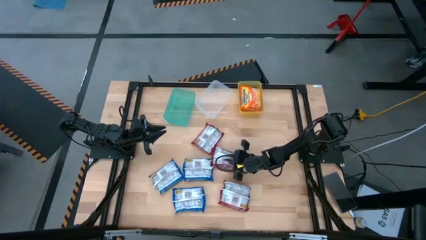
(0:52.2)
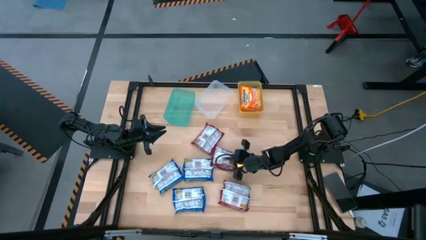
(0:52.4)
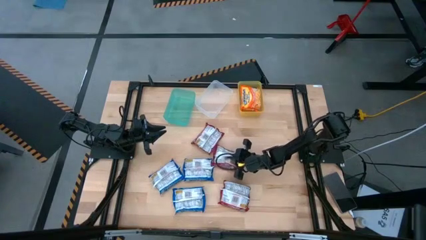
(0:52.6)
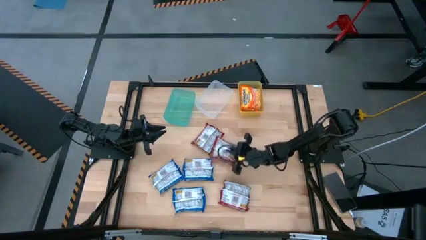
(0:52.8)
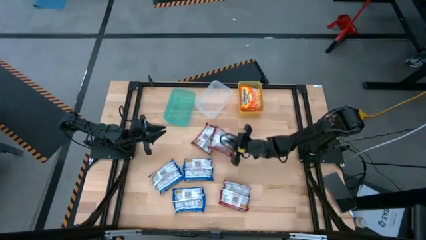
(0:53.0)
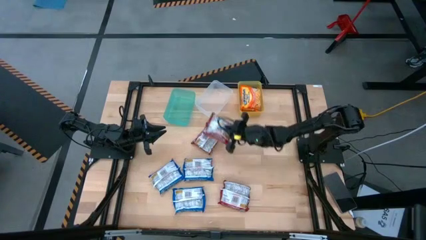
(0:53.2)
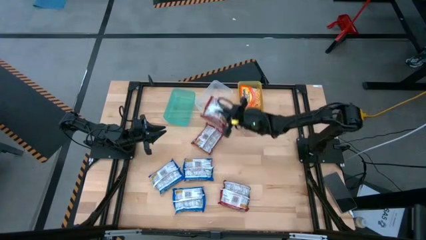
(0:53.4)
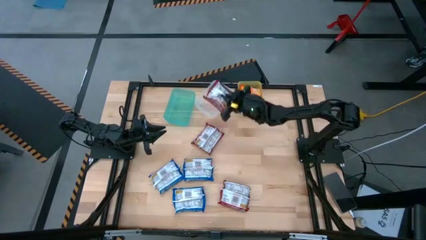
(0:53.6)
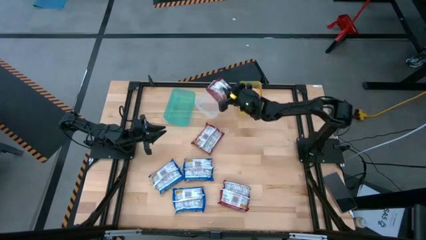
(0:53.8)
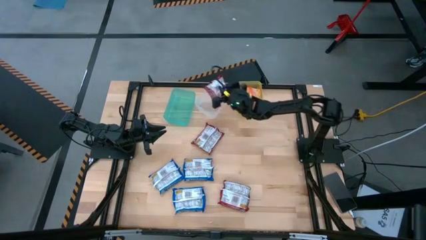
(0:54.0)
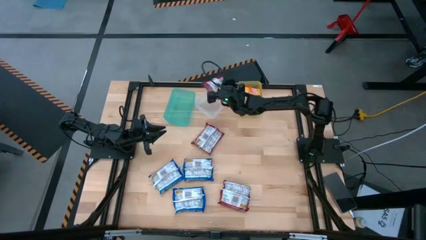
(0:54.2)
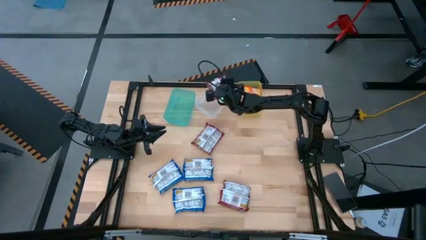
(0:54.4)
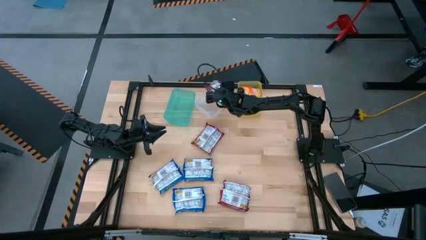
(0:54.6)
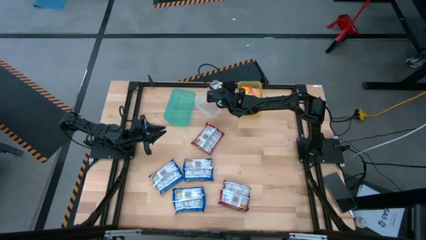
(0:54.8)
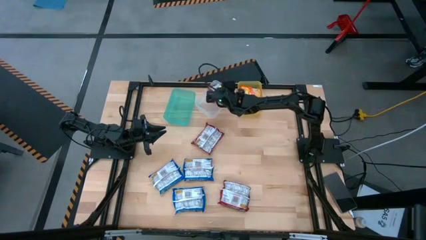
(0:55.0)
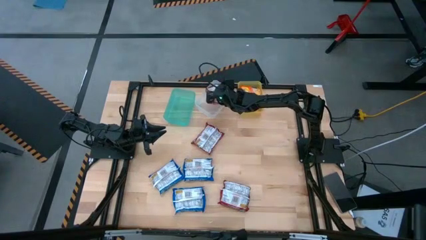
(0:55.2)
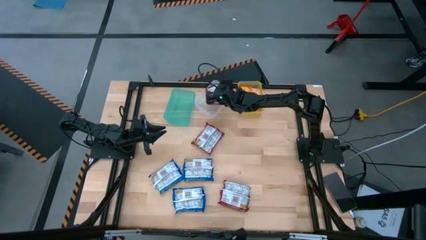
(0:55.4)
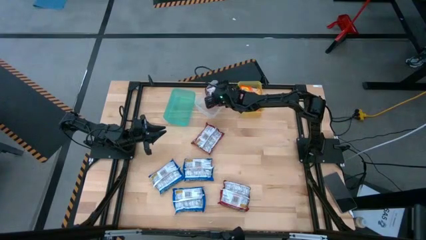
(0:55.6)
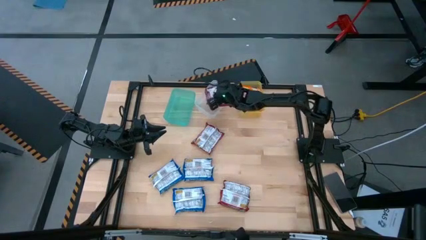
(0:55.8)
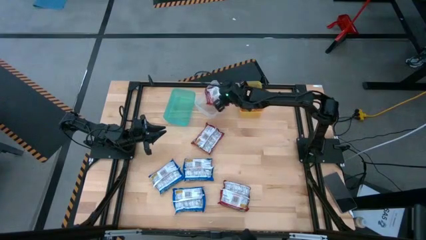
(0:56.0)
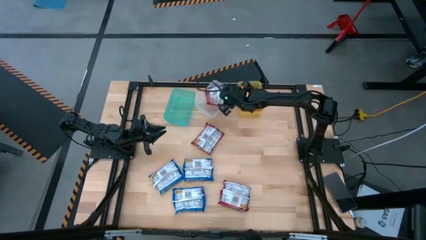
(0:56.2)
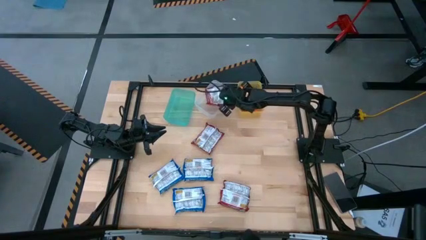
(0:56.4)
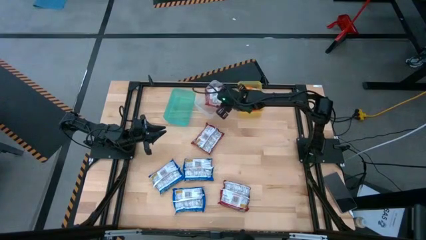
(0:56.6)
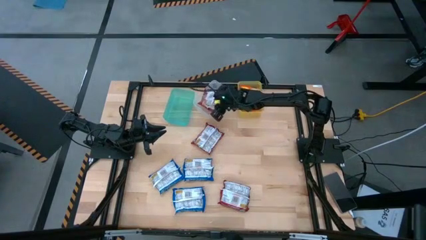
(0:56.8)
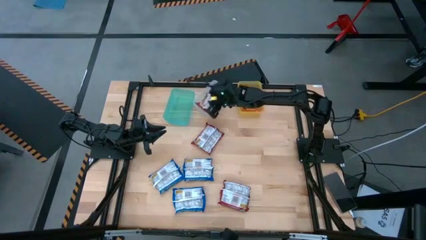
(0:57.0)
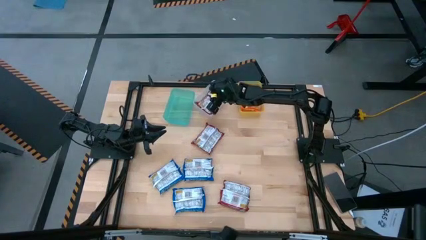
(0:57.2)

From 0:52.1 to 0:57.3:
Task: Sort Maruchan noodles
Put the middle red noodle pack into the transparent bin

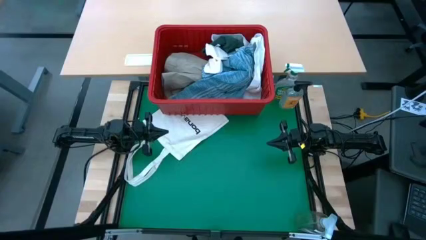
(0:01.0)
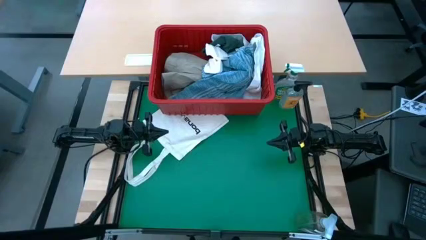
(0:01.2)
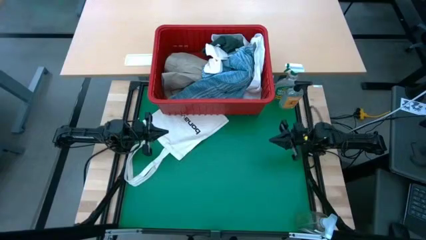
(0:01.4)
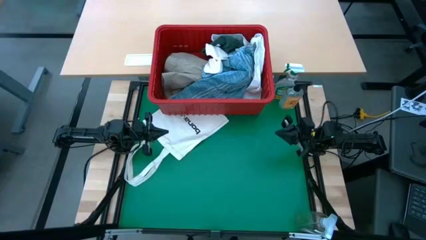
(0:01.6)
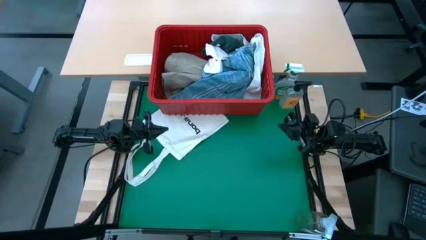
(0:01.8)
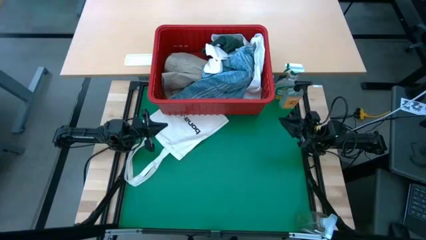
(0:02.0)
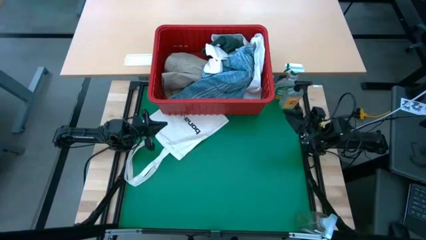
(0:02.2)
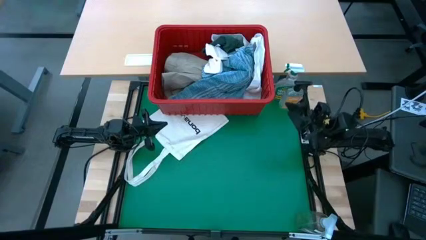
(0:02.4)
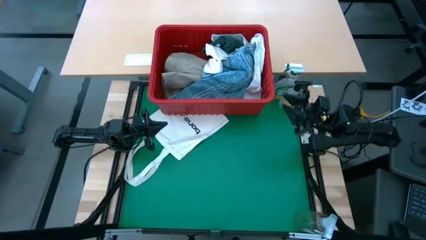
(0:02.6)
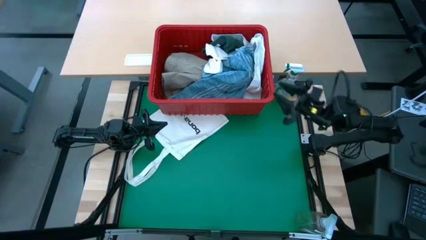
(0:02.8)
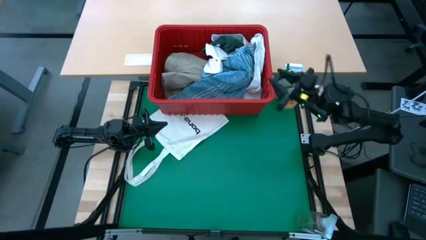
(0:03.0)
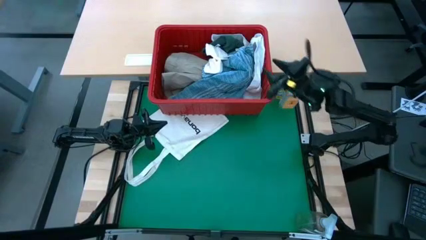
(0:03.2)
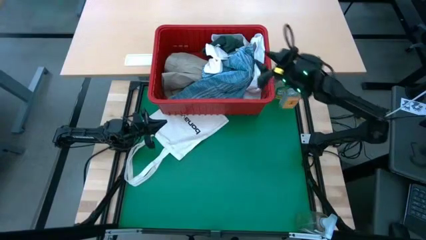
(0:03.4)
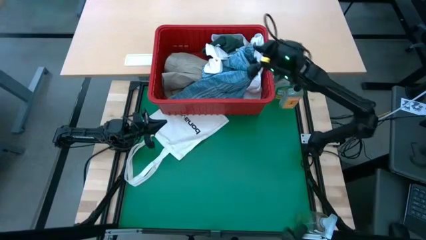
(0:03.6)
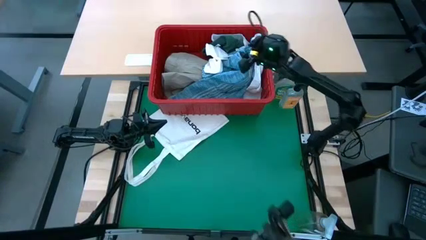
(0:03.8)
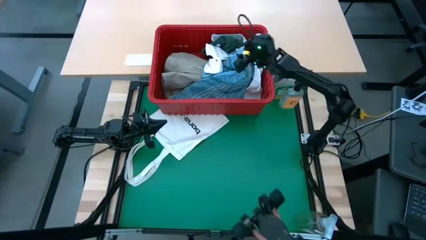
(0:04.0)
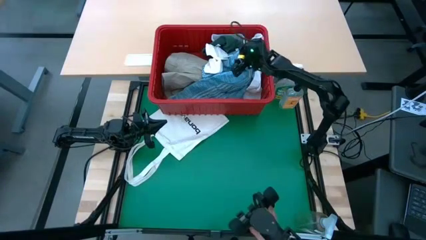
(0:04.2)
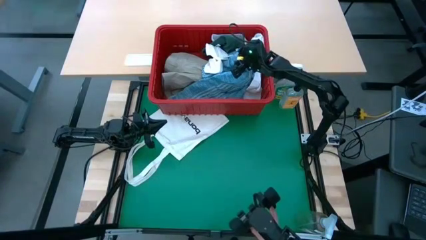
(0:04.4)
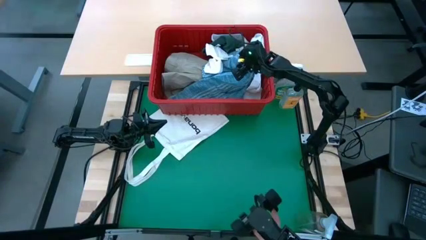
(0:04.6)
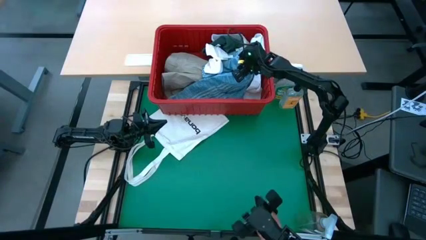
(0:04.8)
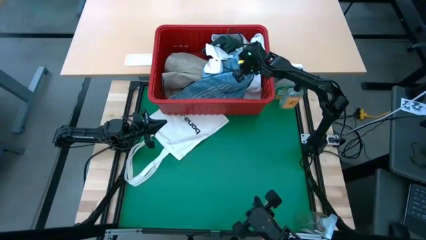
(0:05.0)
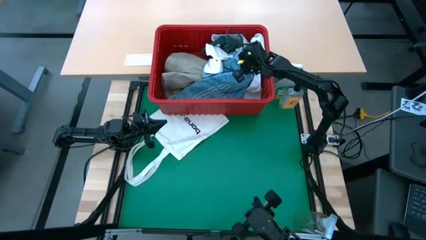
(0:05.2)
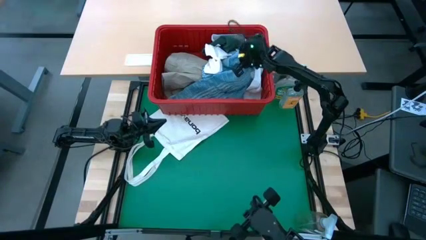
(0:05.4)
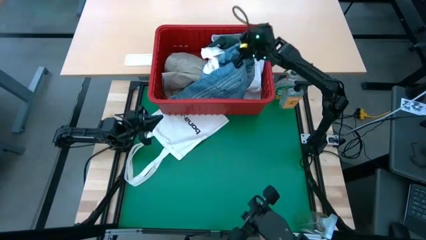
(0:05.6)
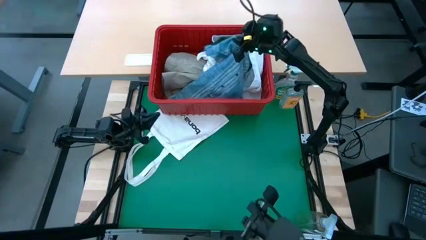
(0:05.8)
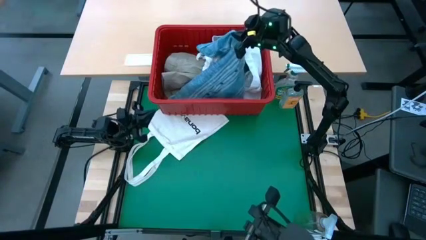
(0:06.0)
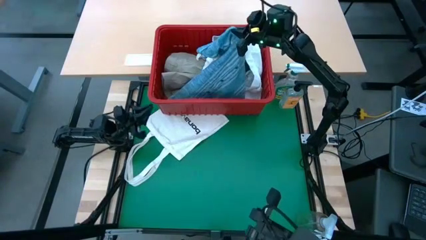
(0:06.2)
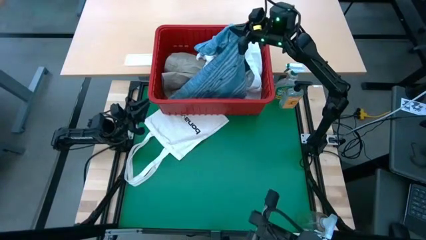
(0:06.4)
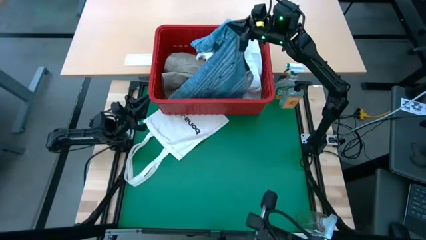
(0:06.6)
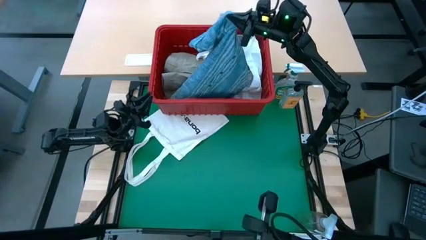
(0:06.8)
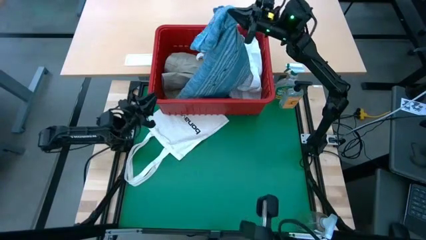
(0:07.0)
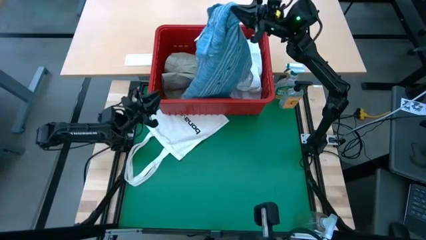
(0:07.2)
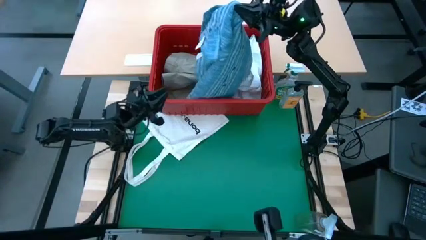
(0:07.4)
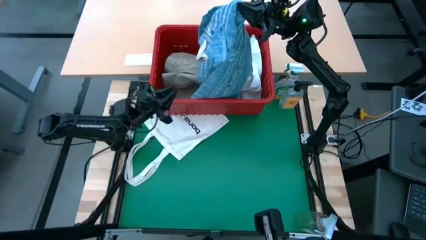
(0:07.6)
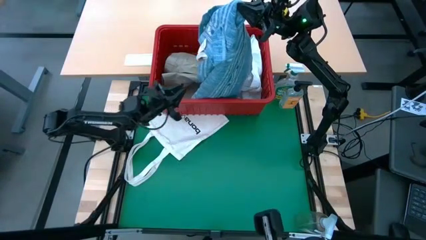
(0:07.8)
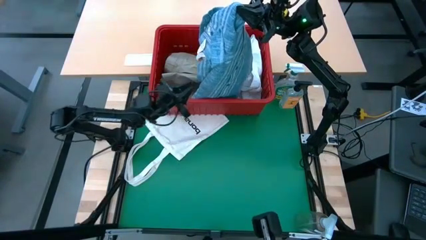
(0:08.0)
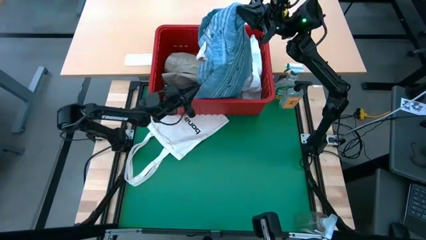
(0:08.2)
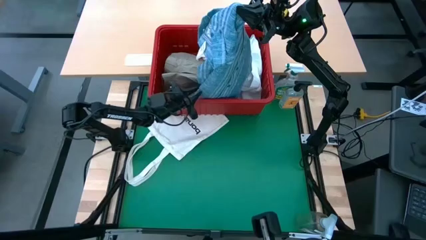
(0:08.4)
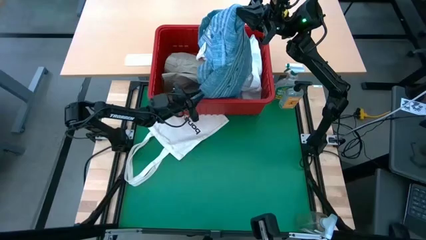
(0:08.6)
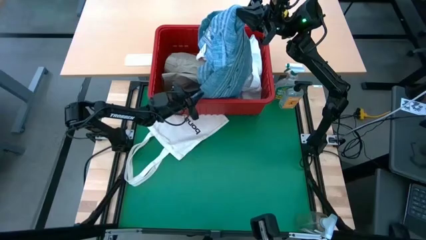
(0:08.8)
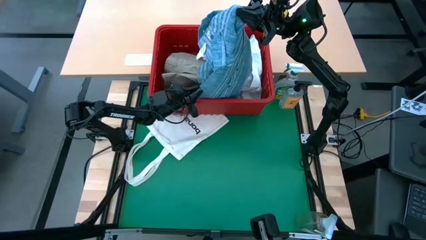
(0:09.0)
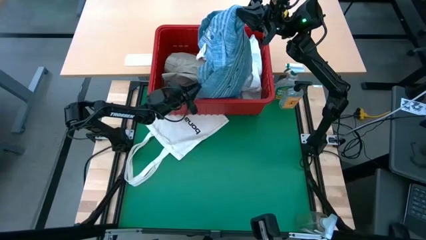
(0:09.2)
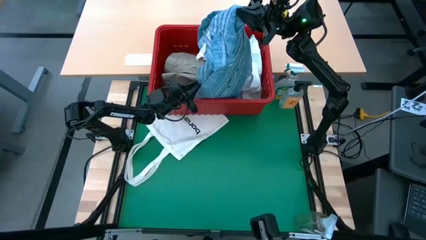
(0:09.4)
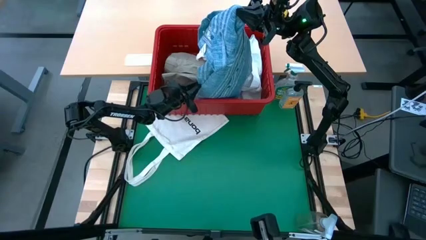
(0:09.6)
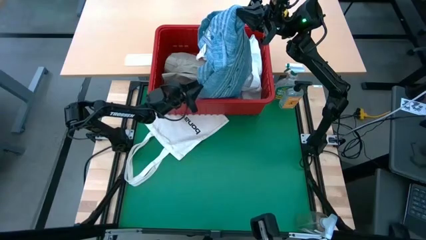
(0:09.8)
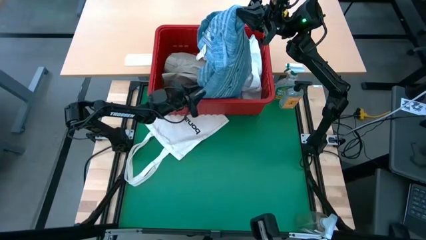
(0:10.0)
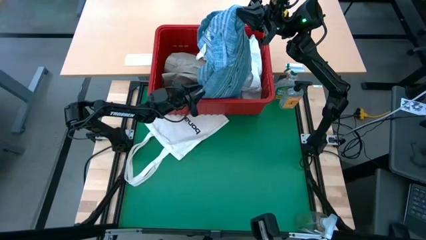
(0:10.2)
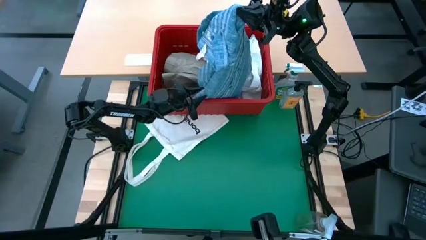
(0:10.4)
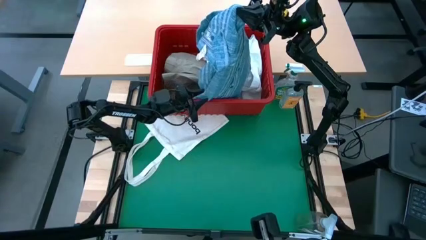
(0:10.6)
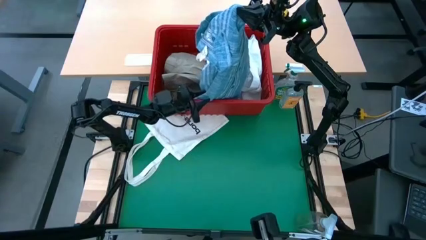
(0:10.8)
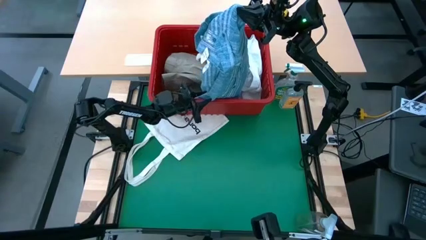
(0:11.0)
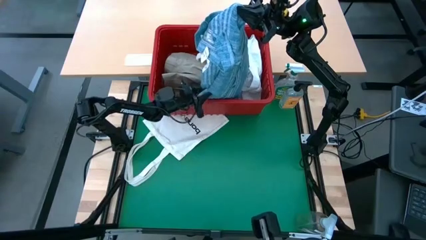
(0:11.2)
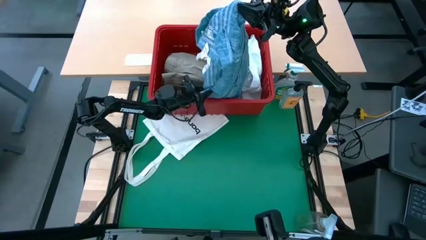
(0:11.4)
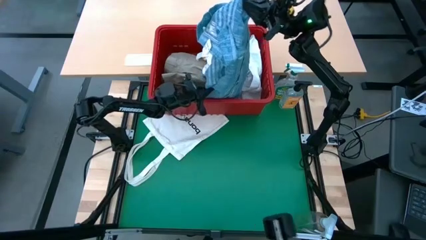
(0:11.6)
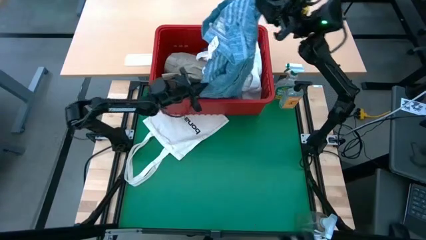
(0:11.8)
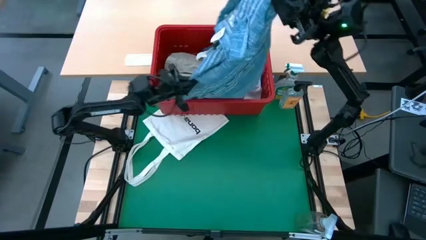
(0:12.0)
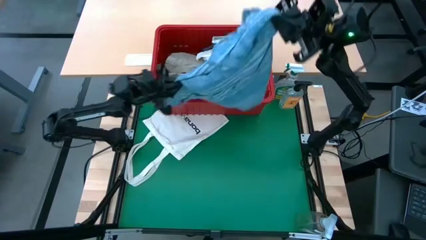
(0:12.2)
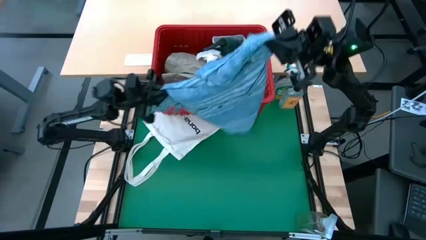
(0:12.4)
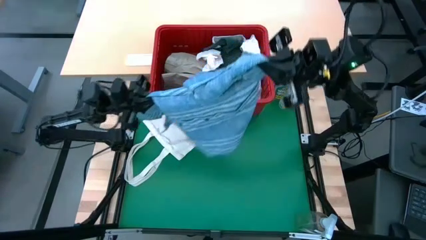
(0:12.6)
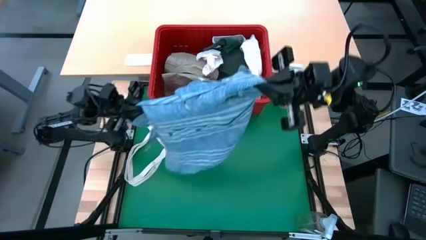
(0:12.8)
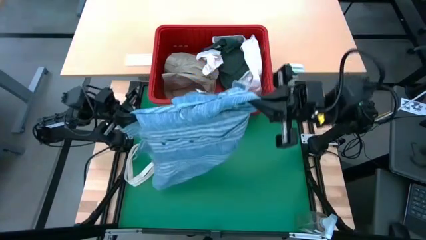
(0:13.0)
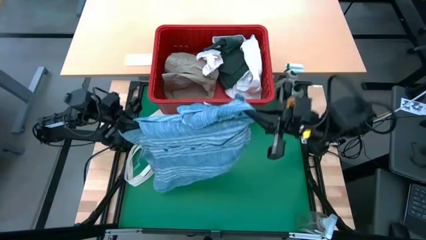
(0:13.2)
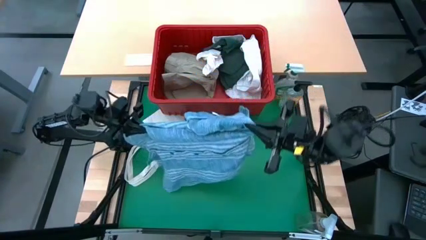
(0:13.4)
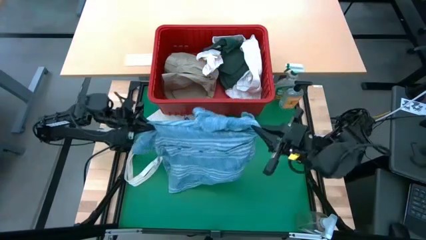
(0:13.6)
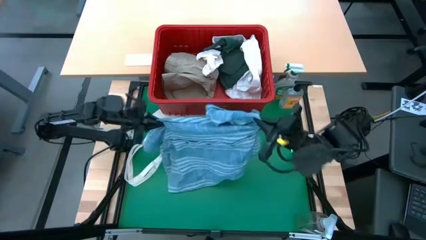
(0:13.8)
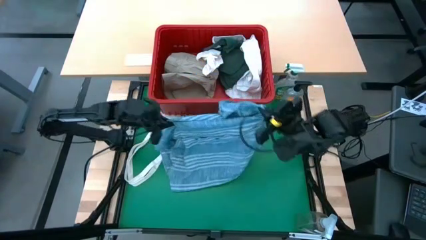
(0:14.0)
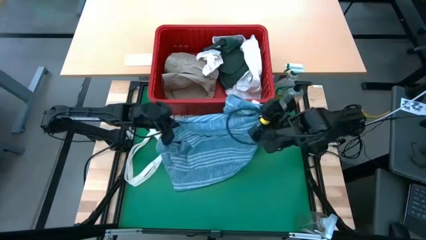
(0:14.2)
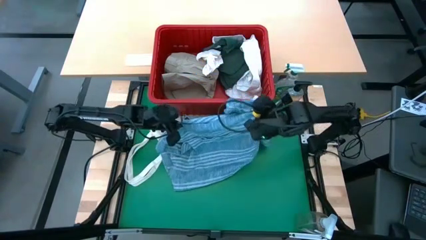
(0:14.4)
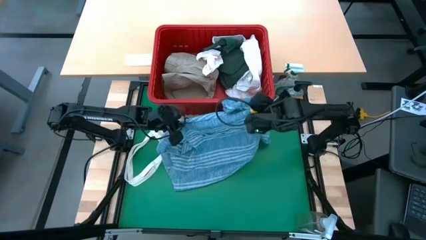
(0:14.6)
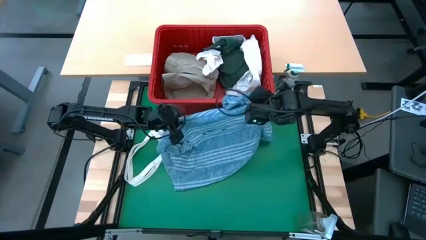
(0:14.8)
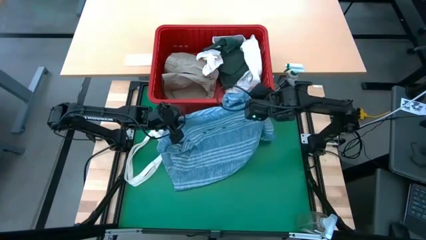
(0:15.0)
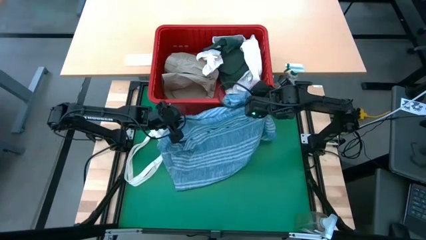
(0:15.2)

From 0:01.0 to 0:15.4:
Task: Fold Laundry from Bin
Remove the blue polo shirt from the red bin
